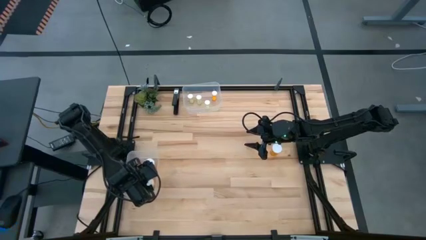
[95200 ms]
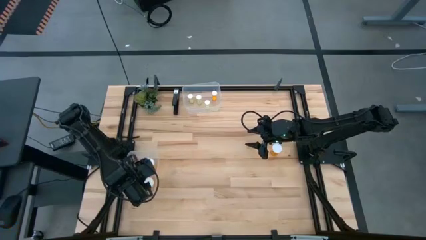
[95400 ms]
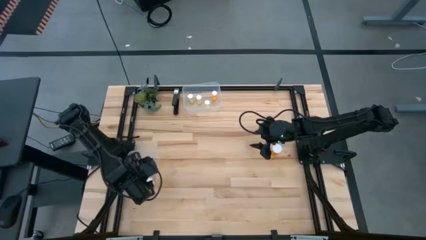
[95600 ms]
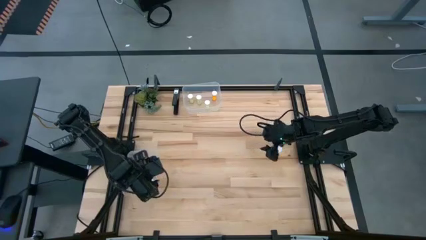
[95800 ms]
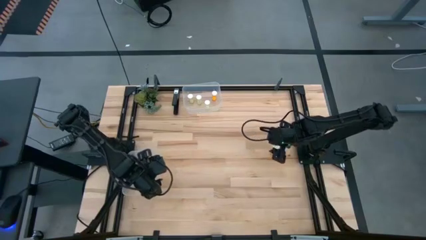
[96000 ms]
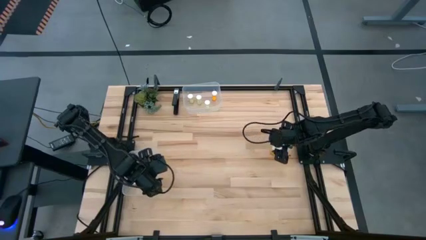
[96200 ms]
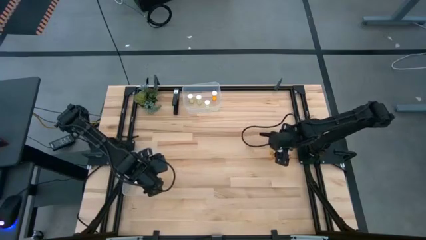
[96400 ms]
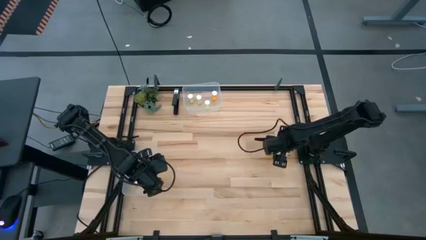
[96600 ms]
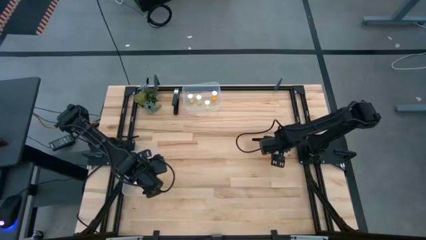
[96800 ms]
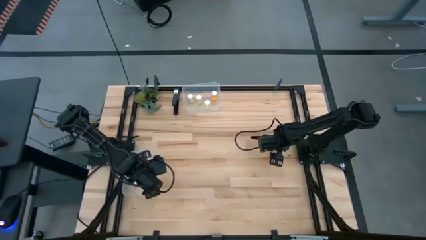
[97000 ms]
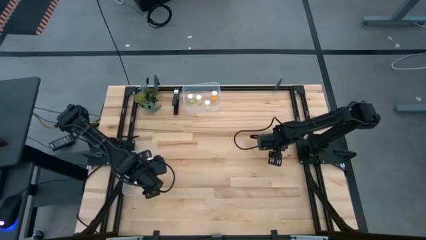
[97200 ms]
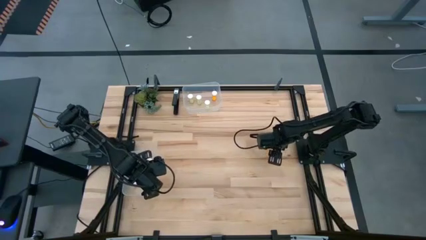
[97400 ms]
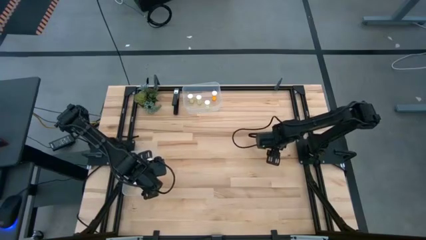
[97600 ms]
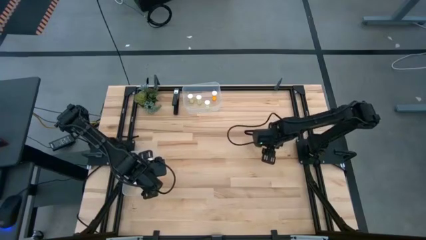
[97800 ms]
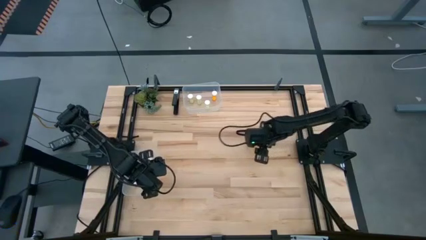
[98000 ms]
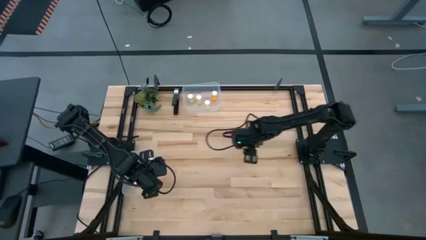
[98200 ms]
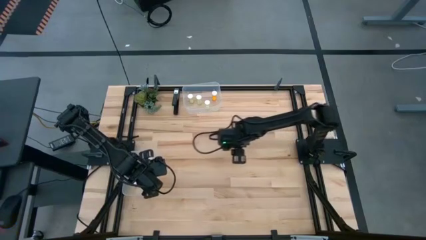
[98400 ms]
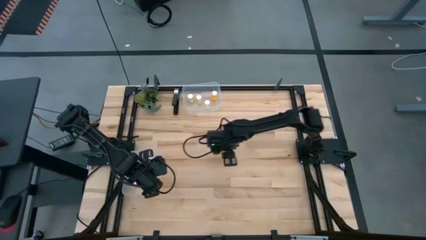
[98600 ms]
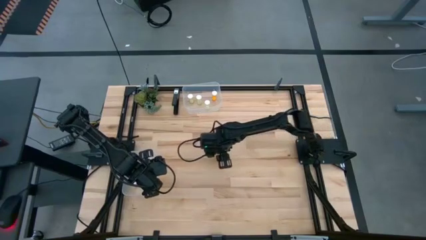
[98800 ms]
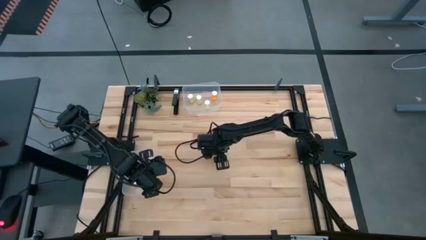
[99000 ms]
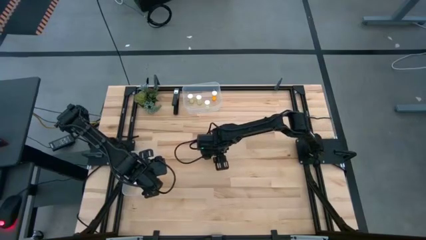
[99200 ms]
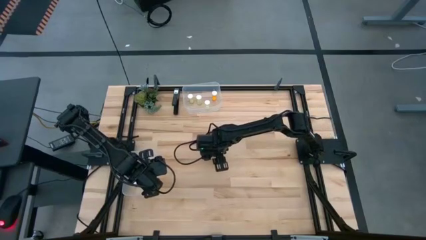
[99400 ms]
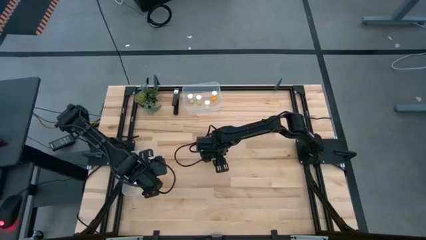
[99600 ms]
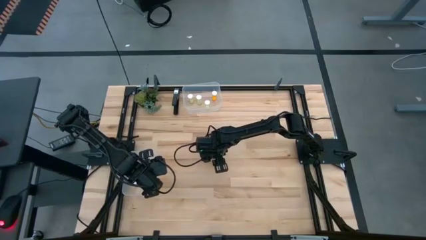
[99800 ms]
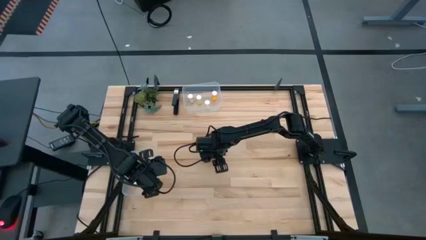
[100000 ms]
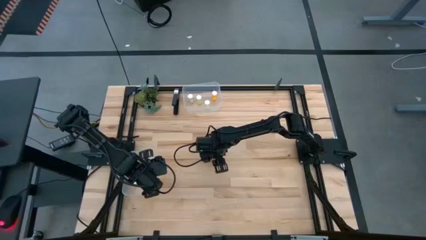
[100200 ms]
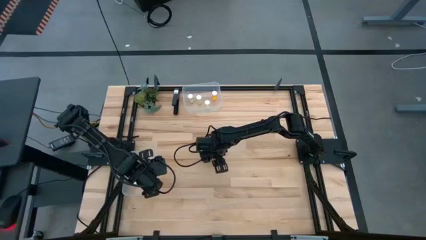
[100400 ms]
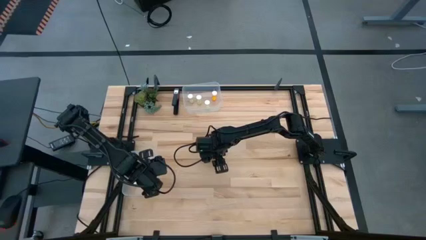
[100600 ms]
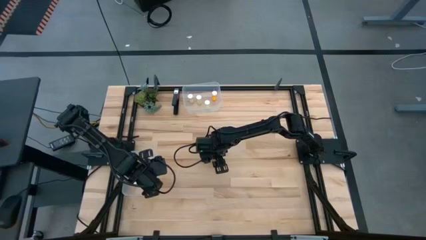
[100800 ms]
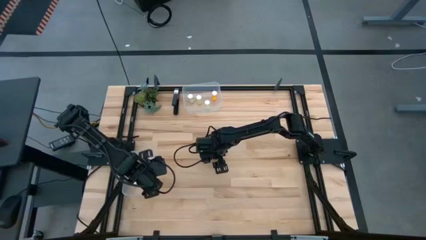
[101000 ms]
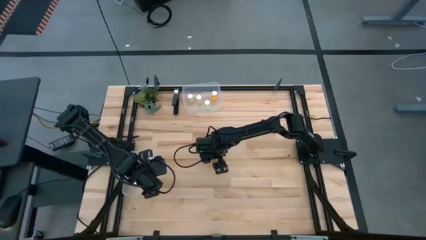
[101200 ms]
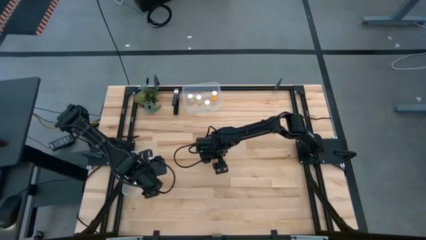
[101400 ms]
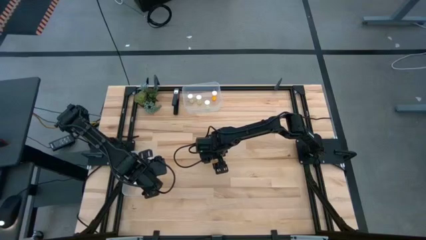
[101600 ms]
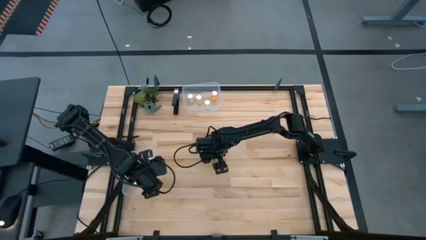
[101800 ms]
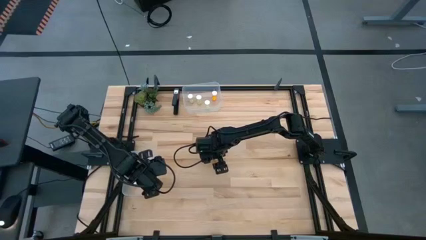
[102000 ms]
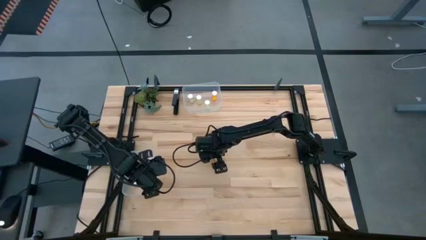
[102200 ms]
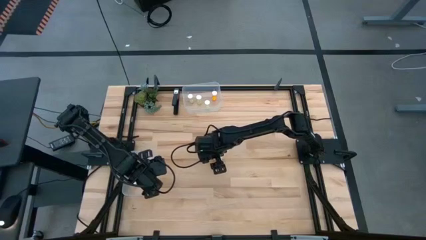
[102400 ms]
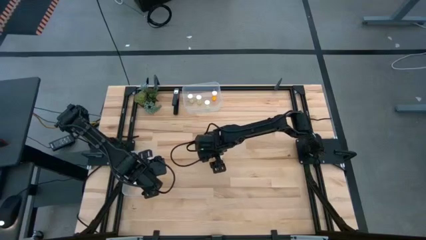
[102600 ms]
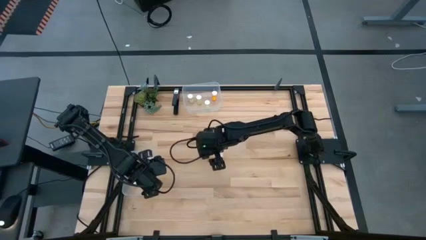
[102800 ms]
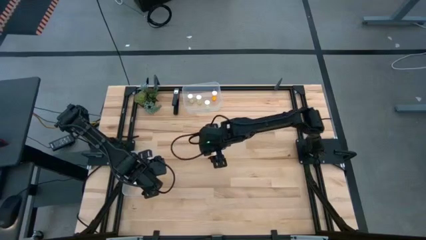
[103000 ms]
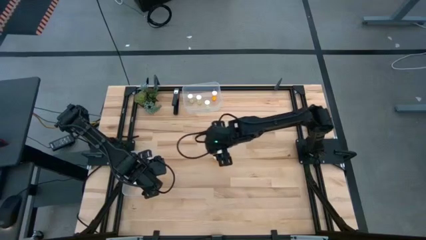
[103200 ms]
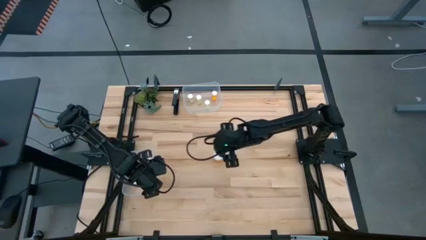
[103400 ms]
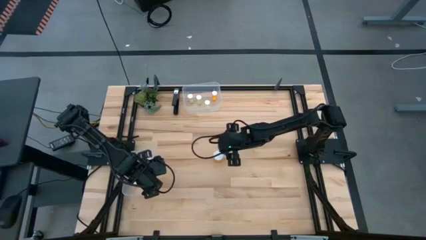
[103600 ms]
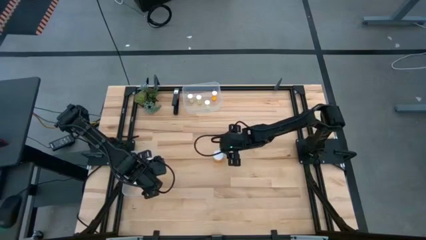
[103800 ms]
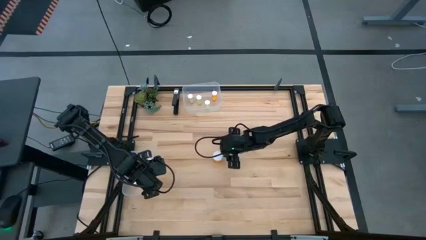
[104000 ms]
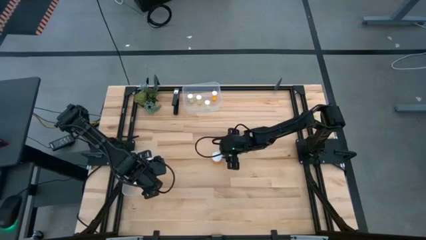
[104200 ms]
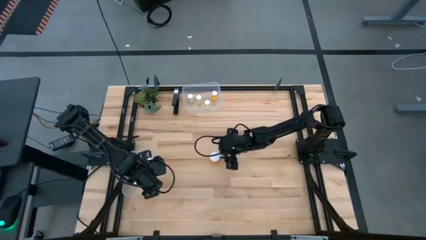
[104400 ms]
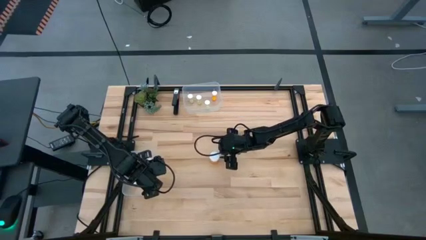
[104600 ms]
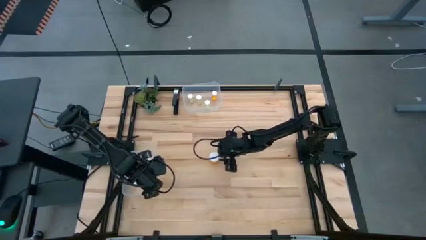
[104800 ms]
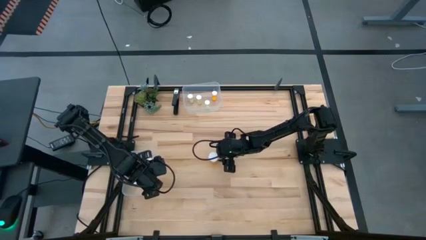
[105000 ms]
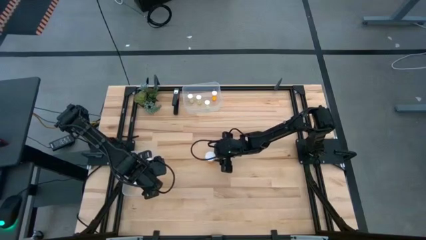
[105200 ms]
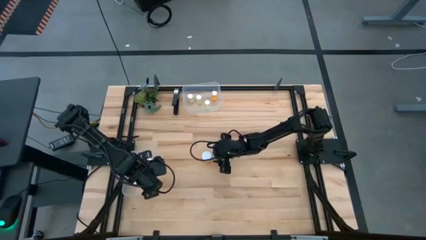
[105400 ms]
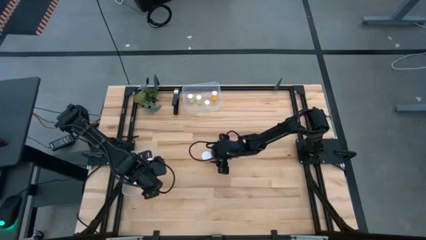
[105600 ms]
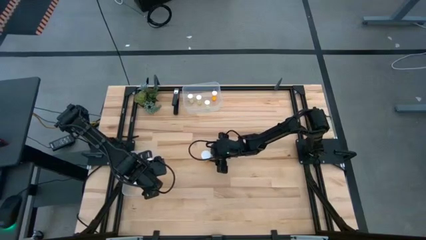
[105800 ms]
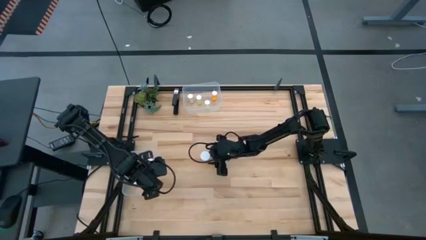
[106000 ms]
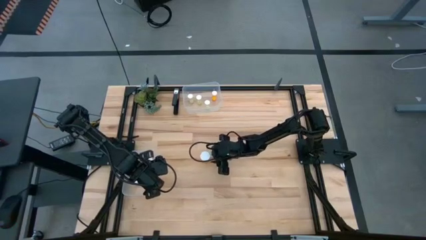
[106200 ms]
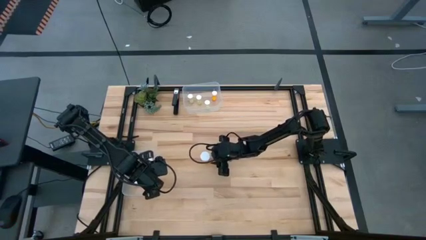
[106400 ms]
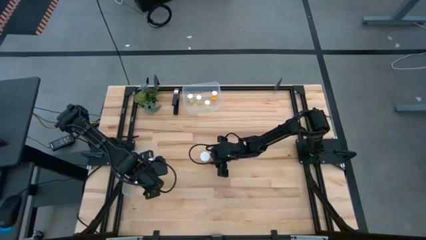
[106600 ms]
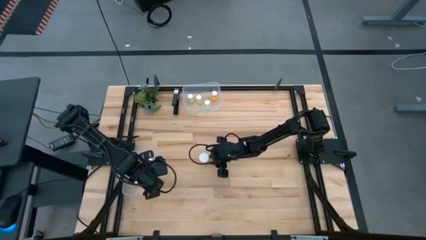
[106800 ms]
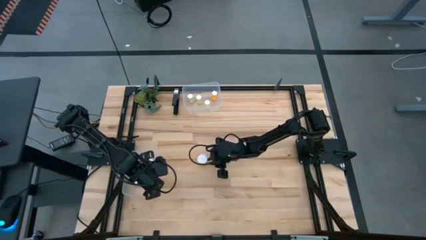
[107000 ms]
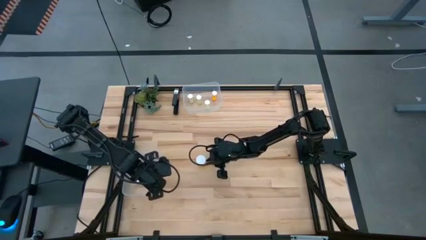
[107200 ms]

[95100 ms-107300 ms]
Task: Pick and place medicine bottles into bin by pill shape (circle, oval)
Put the big orange pill bottle into the bottom transparent bin

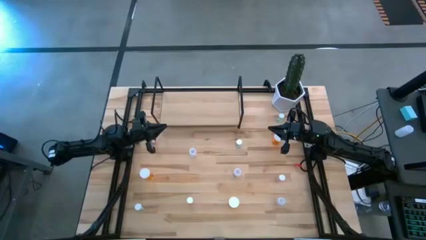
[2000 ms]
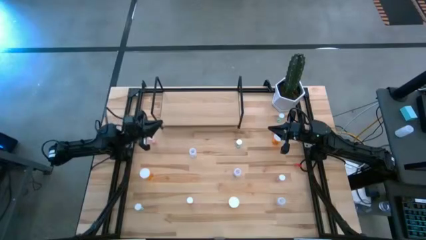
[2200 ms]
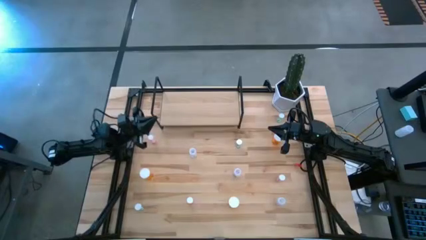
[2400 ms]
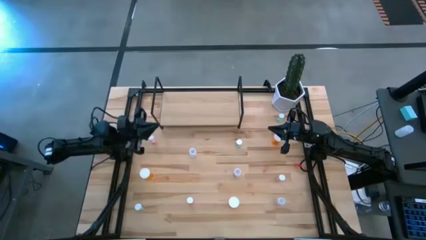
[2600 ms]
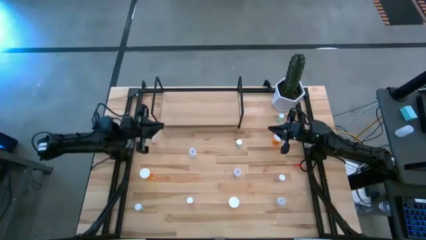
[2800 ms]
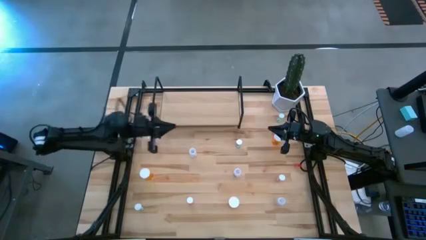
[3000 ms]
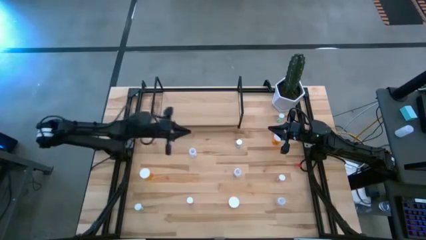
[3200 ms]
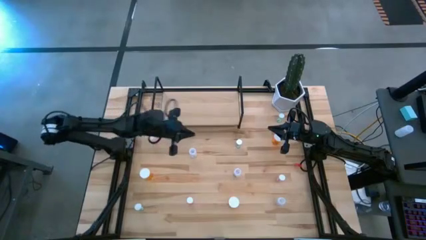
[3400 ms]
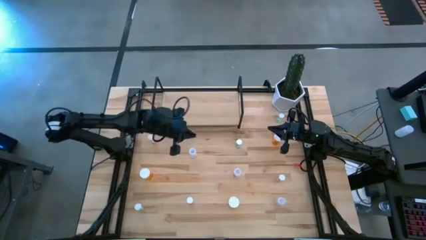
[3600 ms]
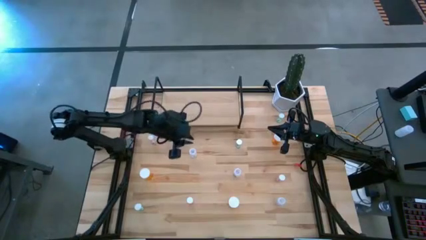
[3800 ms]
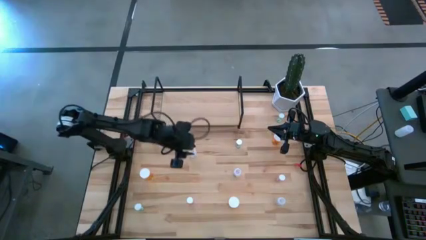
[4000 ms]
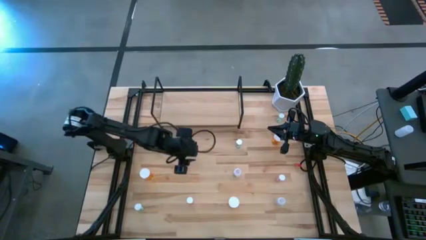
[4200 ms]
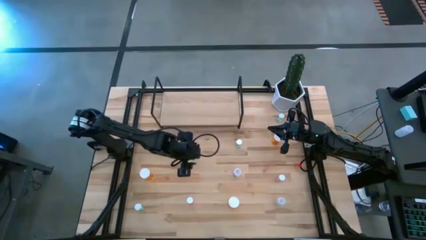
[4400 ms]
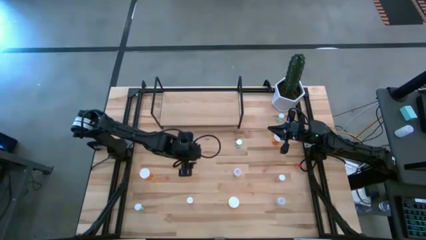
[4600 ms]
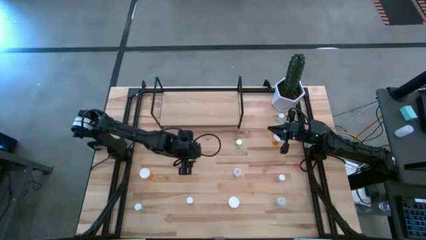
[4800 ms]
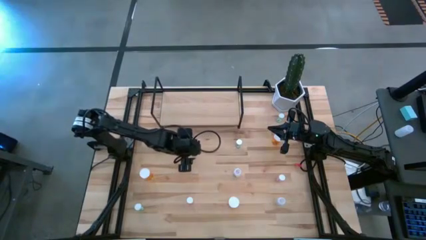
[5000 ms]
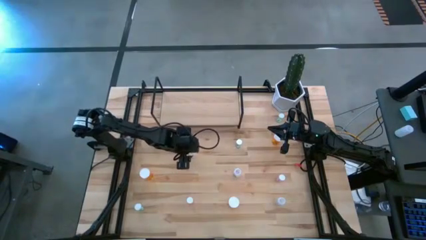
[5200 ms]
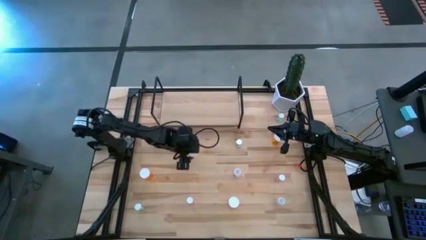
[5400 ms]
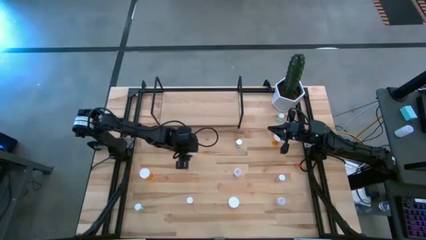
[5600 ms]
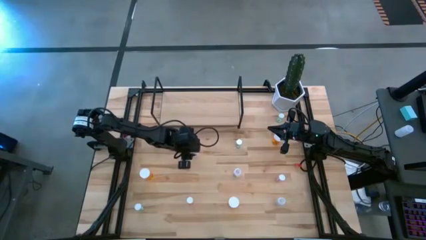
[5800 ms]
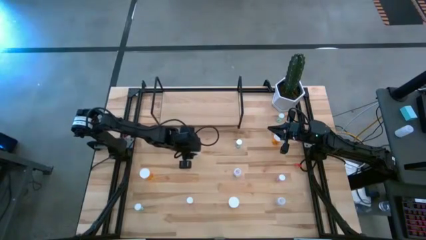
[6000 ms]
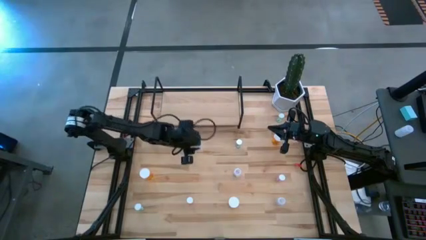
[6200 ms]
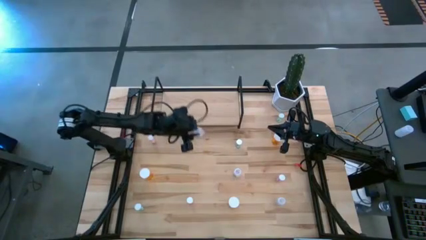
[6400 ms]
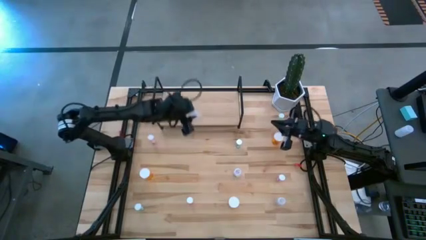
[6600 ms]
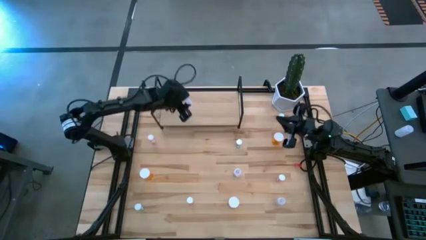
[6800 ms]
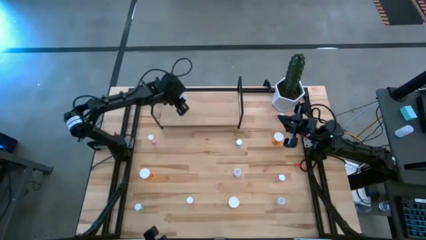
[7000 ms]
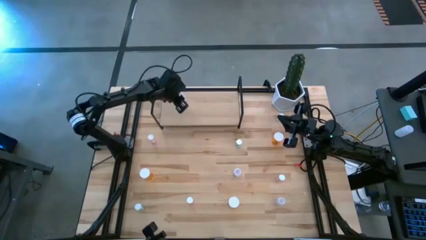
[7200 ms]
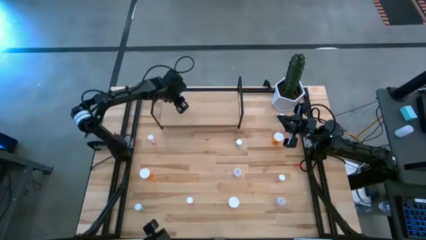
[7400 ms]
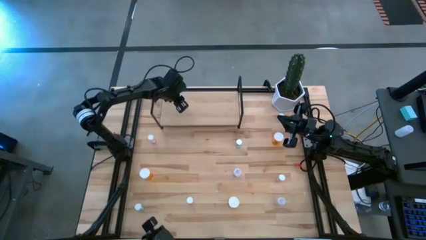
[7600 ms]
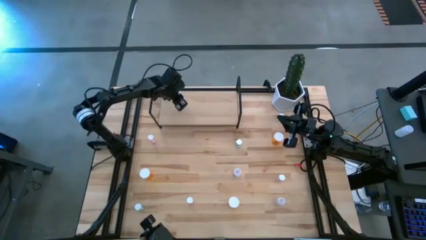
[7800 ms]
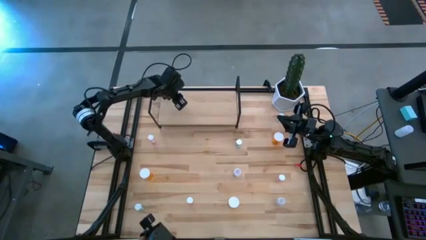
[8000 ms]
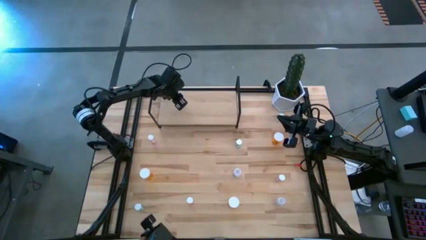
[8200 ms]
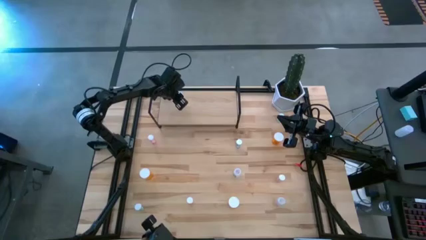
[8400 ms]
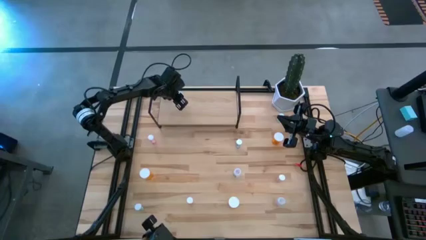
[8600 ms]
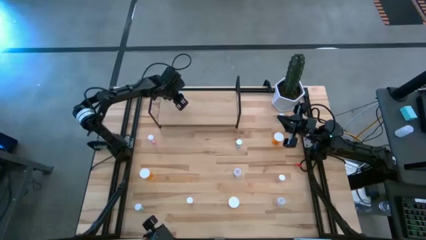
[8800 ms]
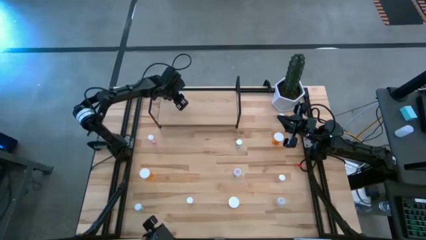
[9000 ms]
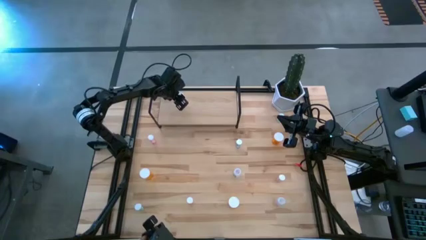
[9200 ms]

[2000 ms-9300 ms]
Task: Pick and place medicine bottles onto shelf by color
Put the top transparent pill bottle on the shelf
